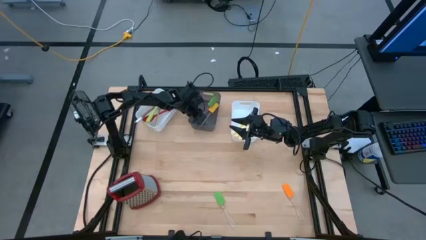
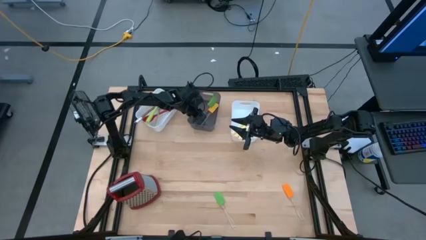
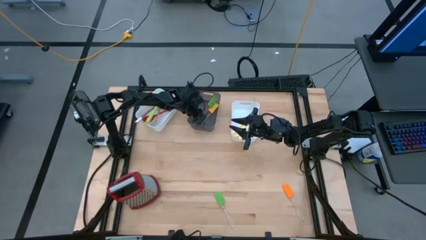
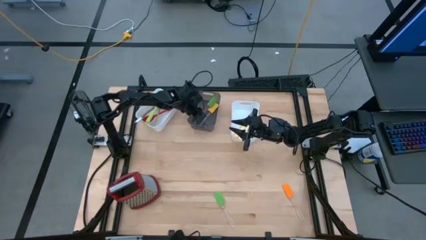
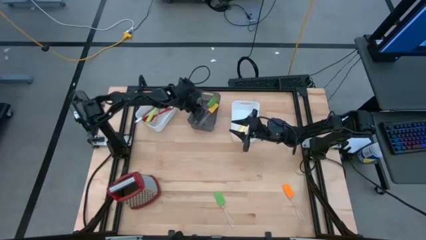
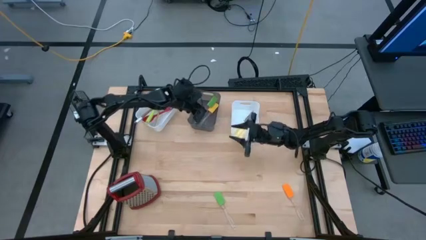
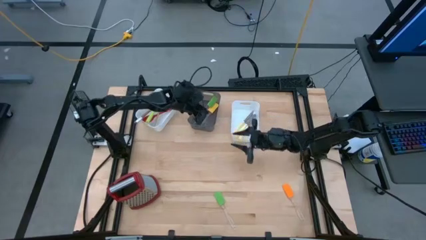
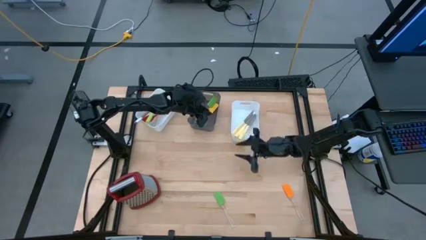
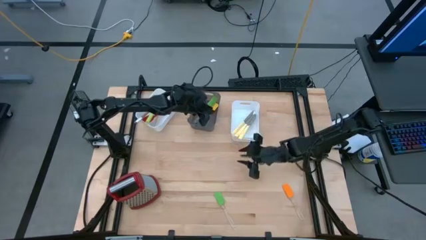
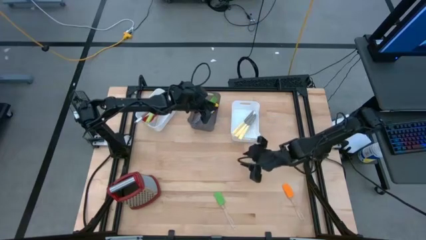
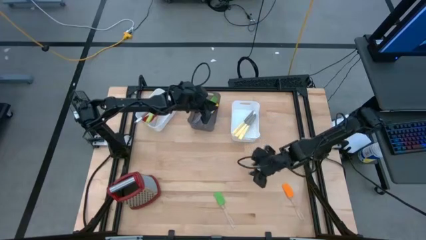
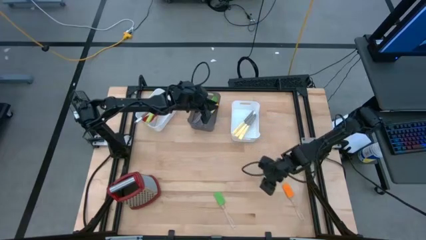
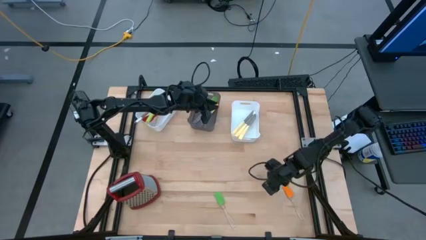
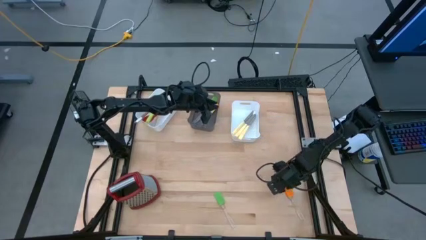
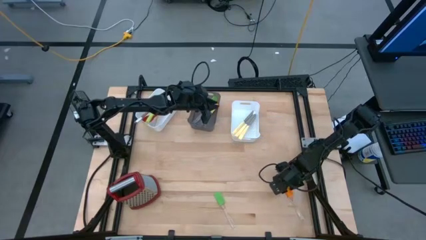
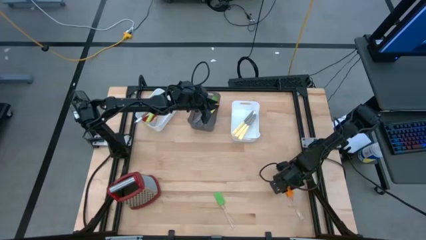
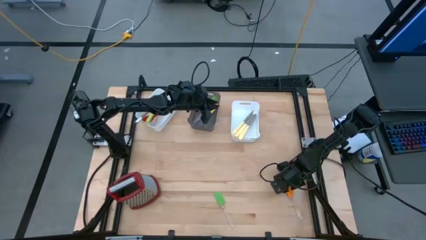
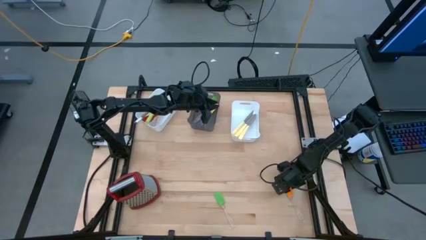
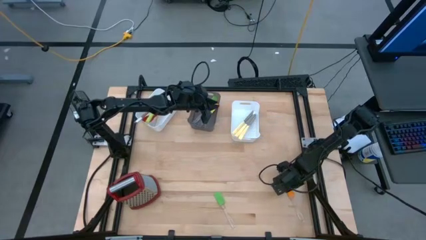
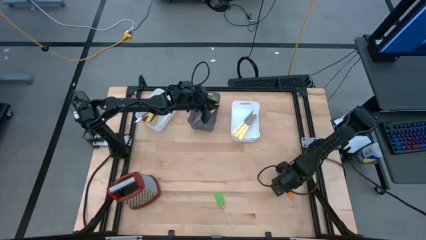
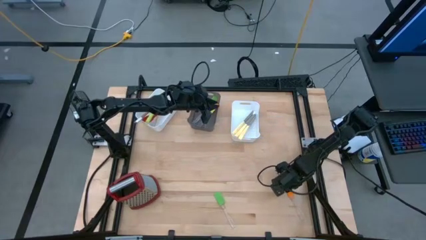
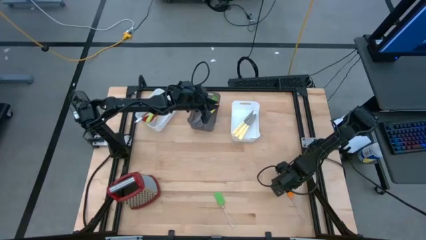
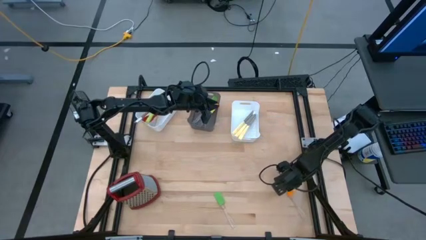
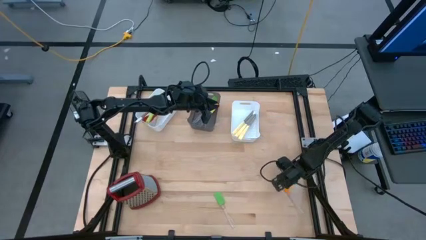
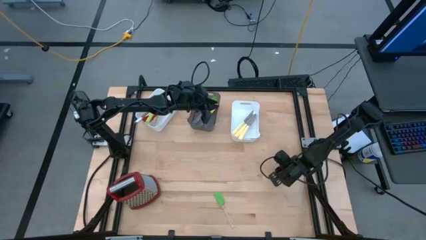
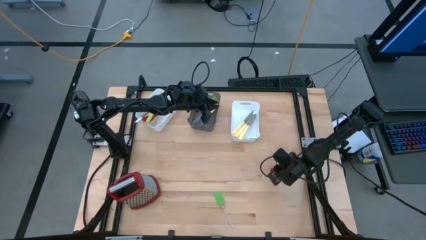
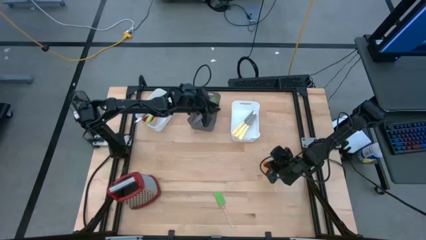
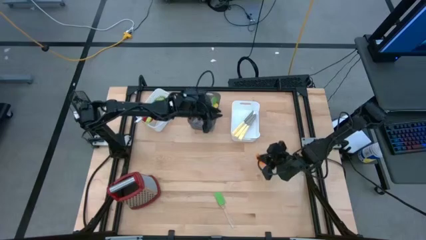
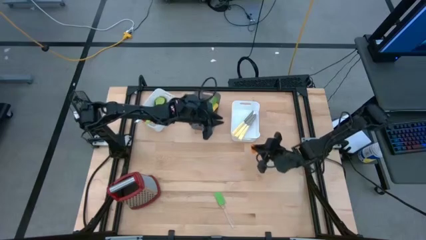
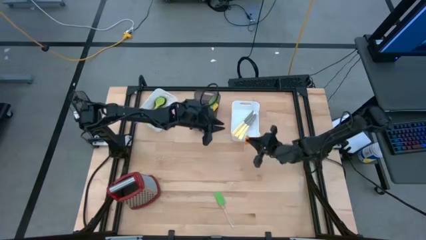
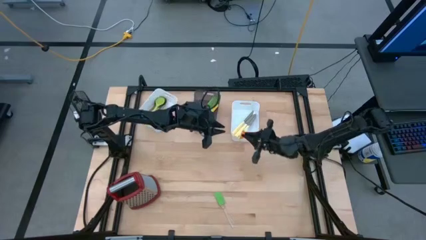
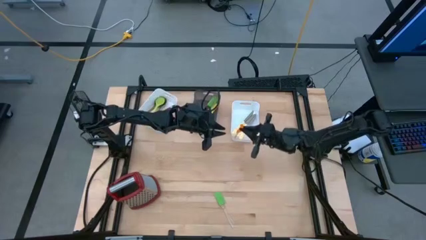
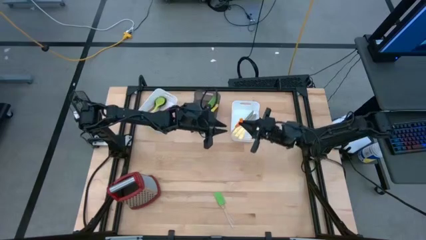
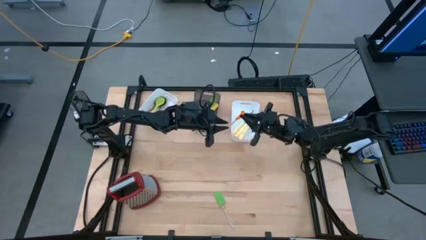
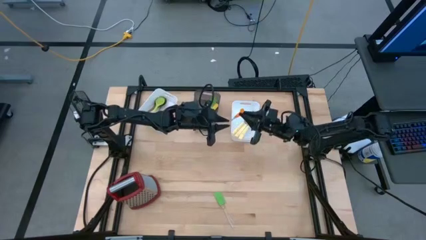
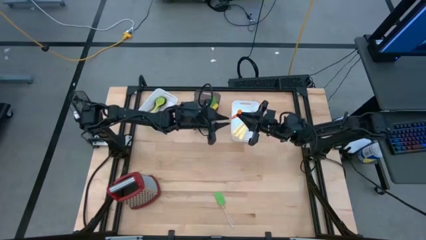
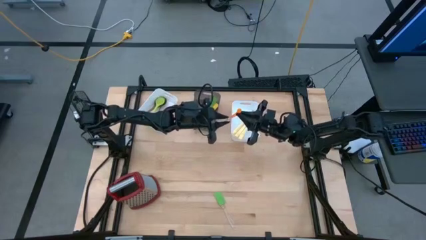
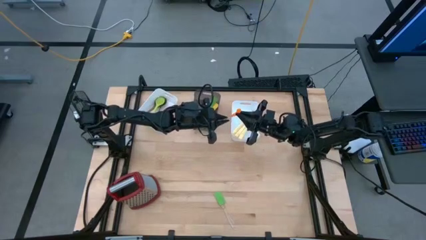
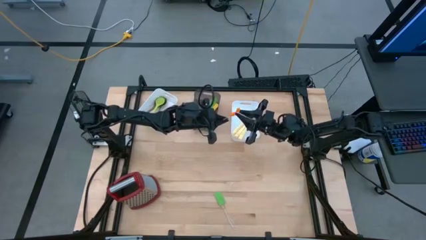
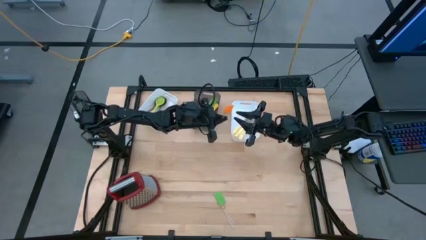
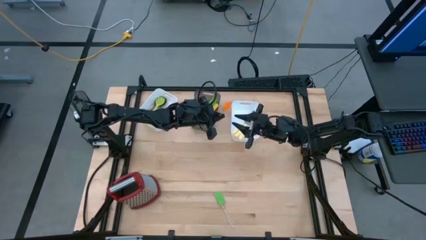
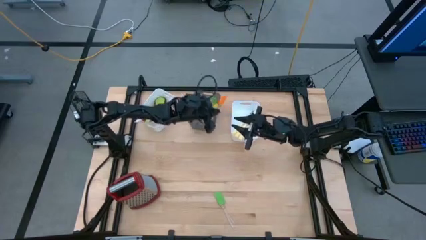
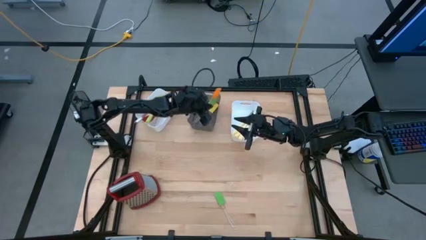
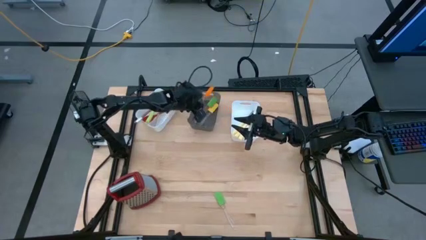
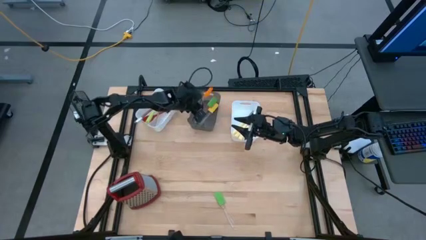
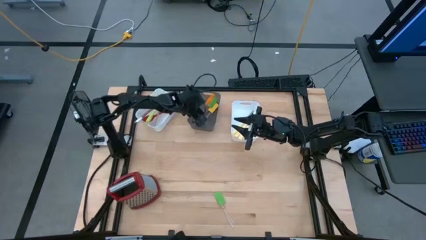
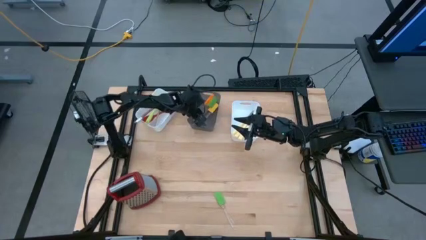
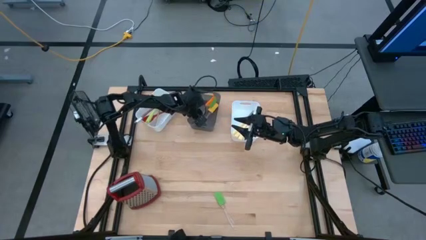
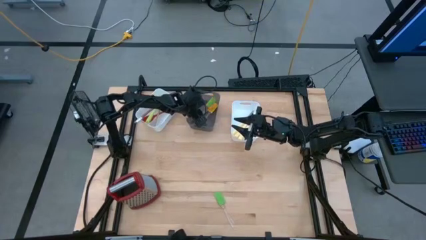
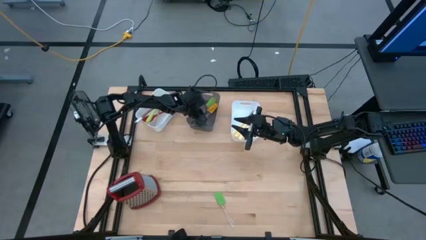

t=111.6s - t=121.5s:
Task: Pick & Place Kitchen Items
Put the orange spatula into the black bin

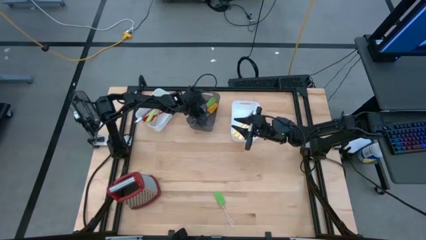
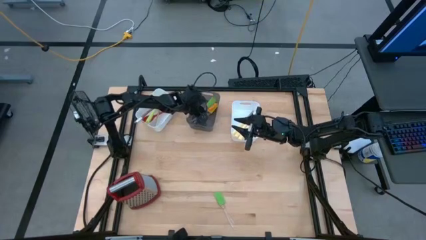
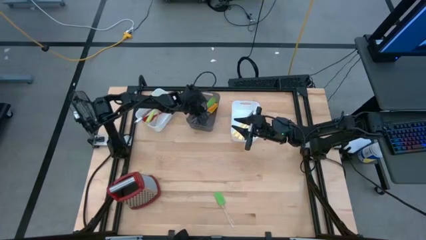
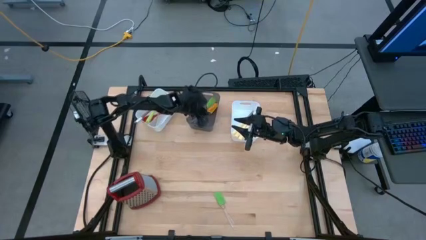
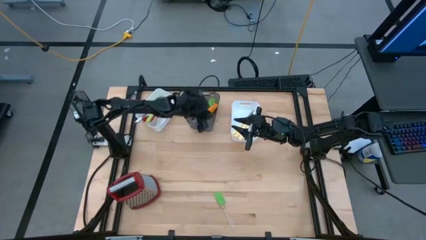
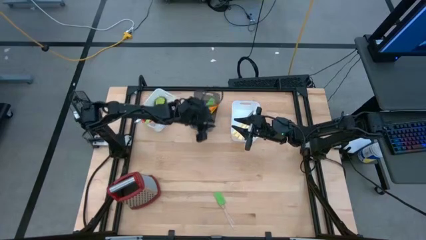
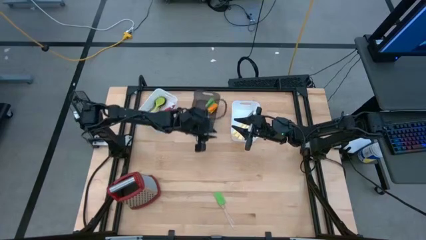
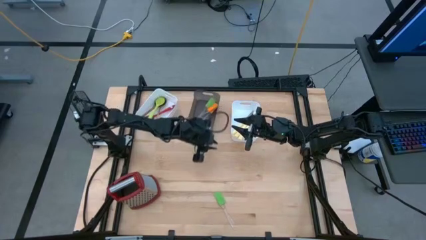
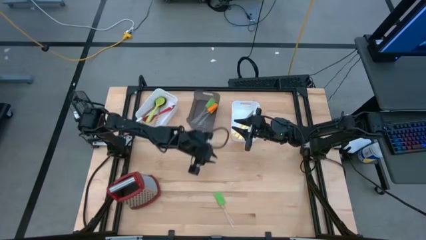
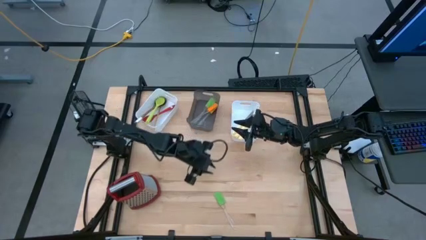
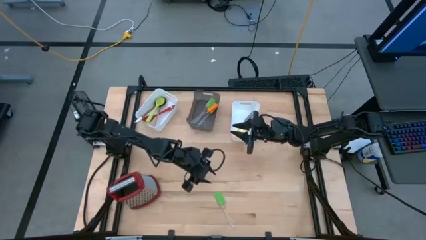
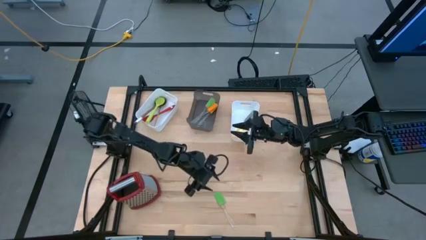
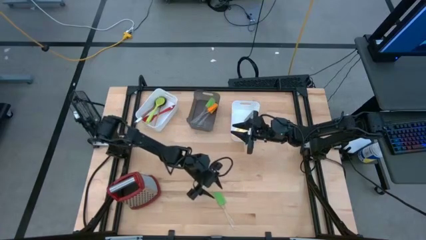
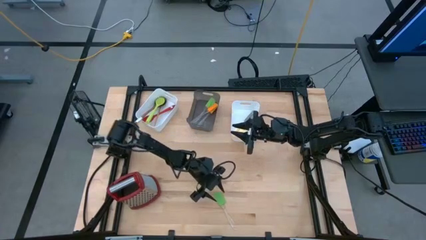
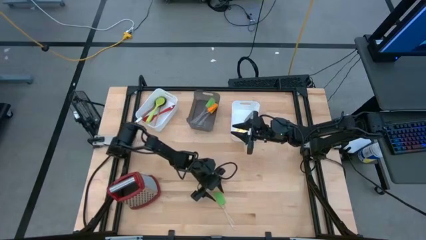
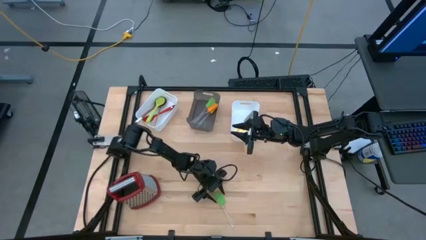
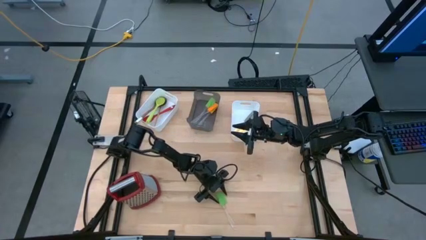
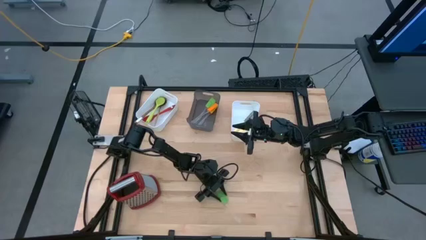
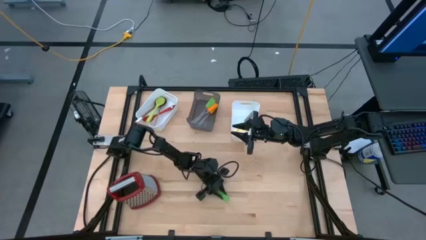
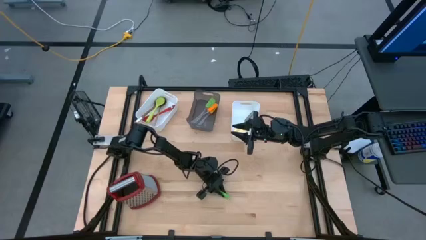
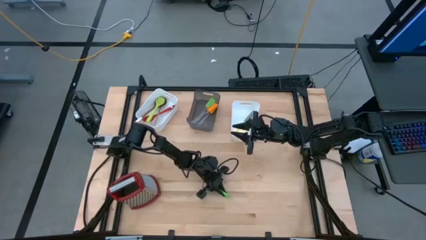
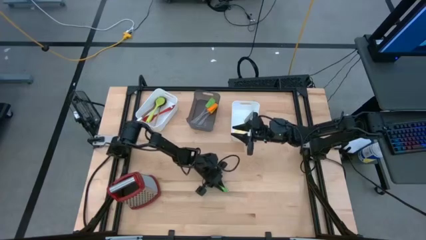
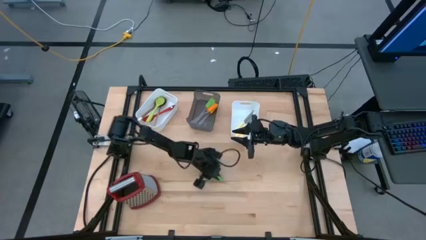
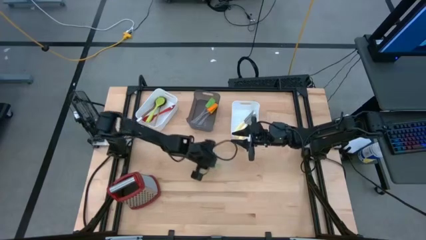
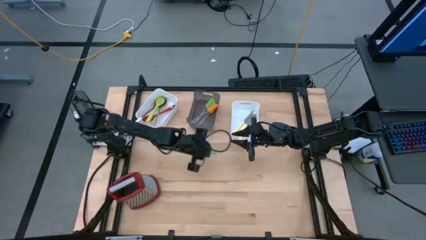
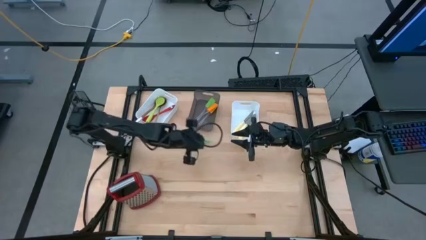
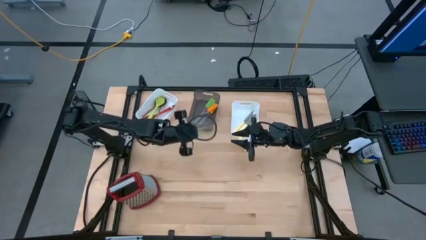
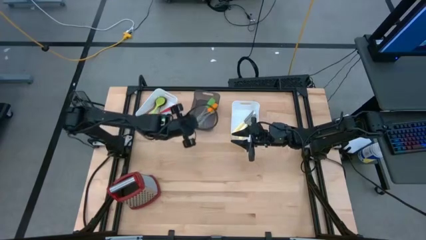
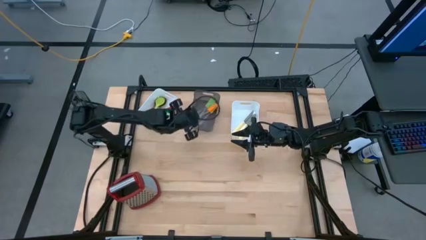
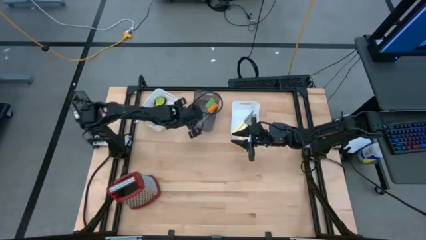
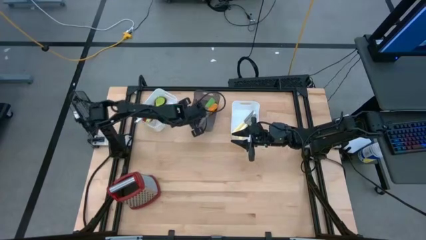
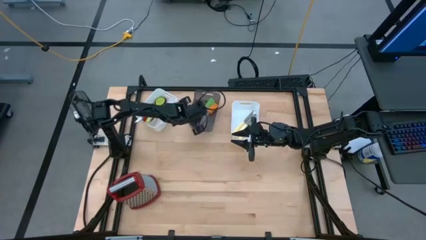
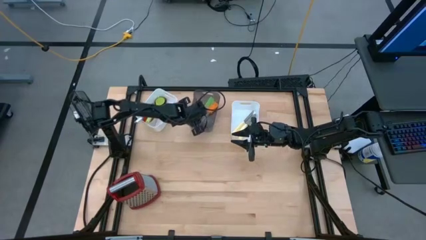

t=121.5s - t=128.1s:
Put the green spatula into the black bin
